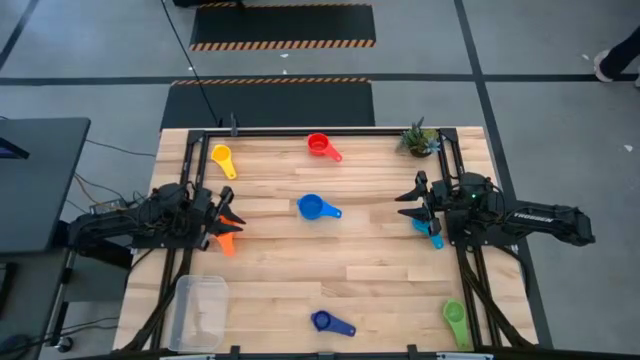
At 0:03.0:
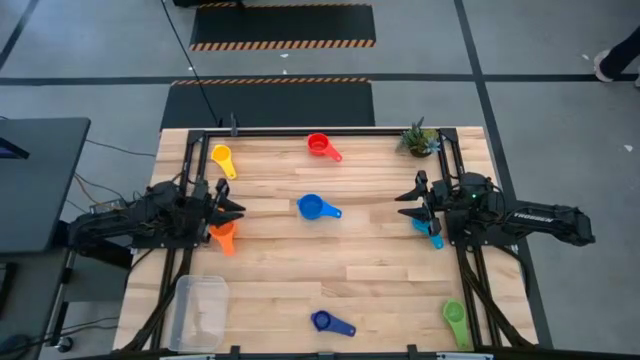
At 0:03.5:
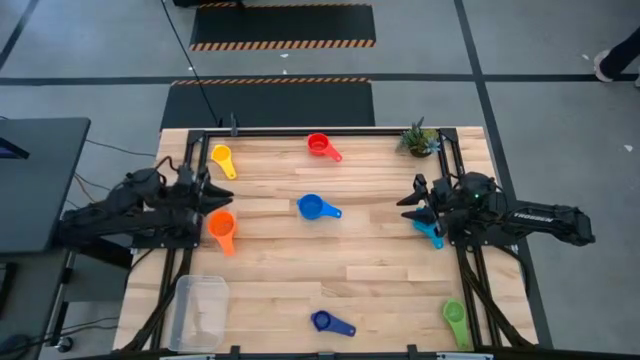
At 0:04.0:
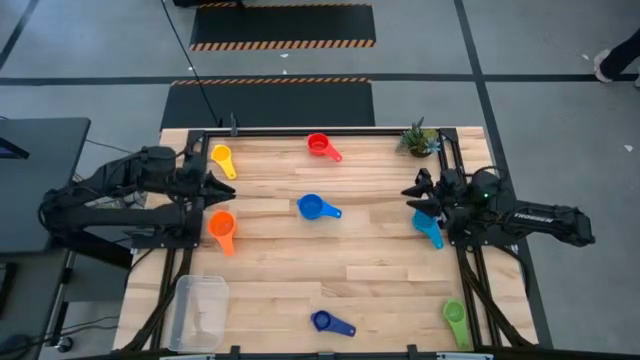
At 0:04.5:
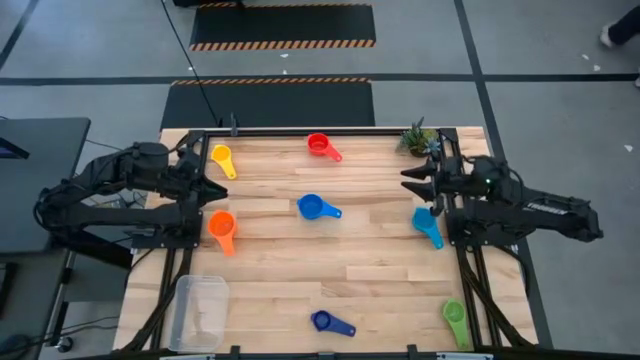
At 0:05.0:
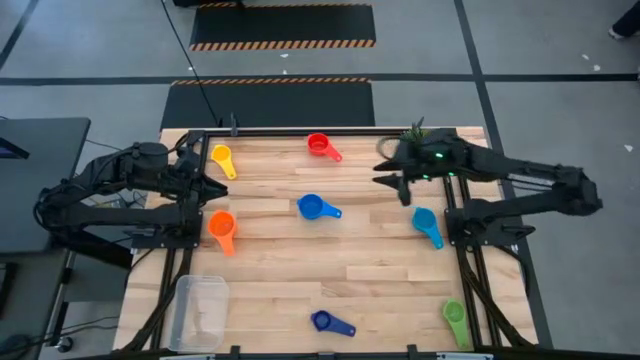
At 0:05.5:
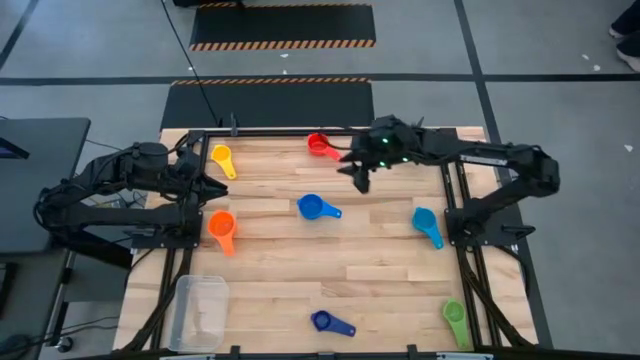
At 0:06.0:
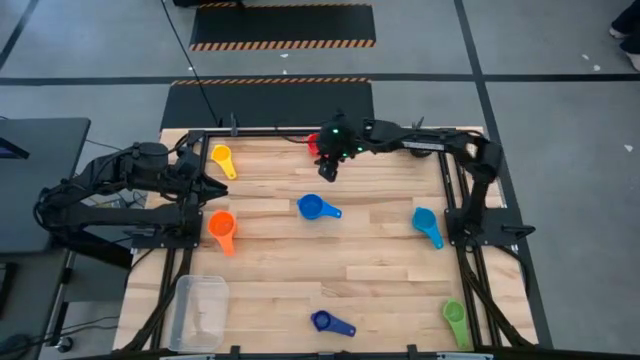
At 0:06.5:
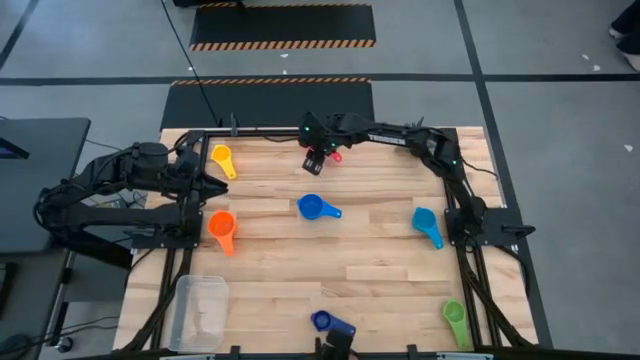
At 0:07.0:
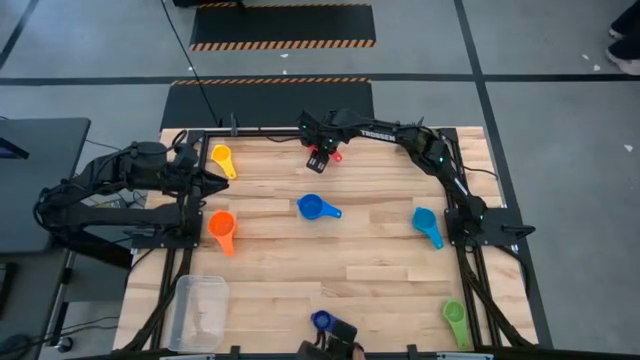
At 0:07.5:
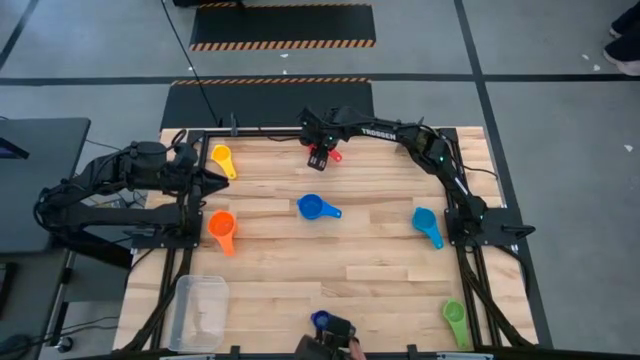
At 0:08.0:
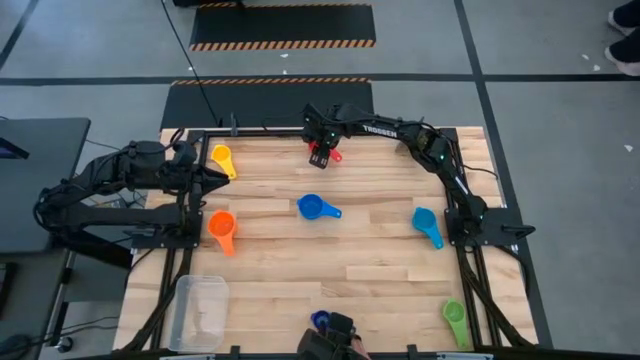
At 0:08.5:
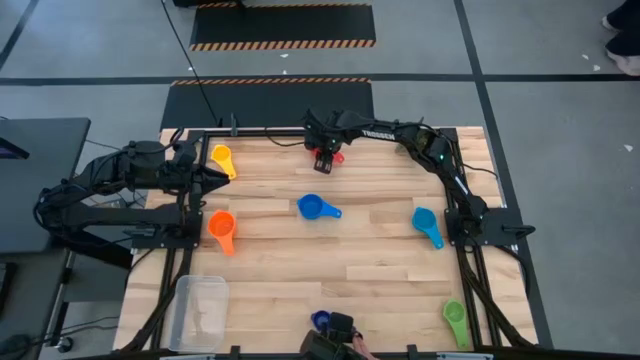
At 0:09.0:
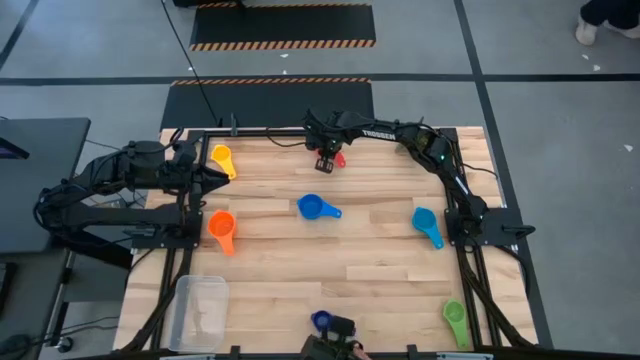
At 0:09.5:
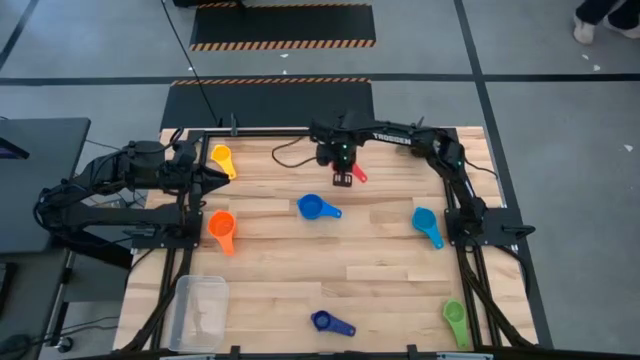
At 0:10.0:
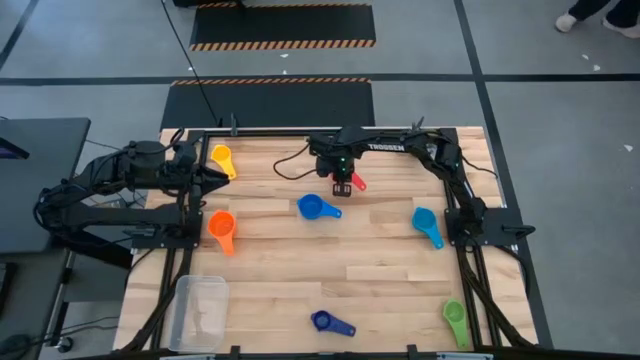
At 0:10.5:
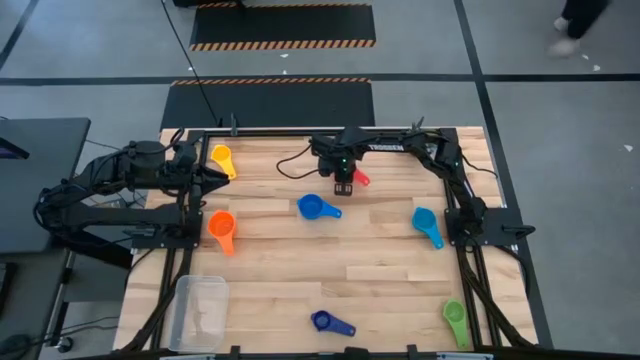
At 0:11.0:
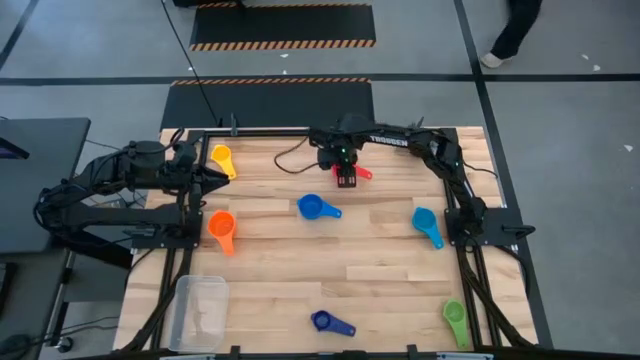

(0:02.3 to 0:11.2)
Task: Nest measuring cups in basket
Adjust the red measuring cup

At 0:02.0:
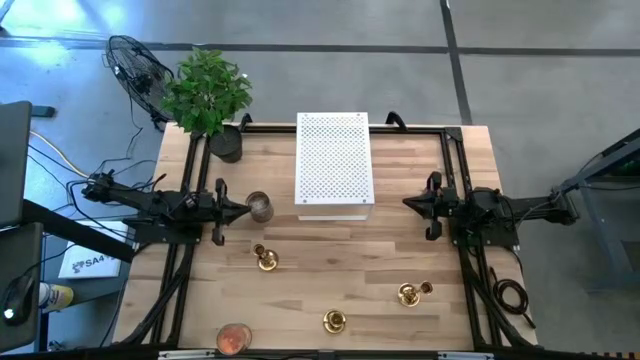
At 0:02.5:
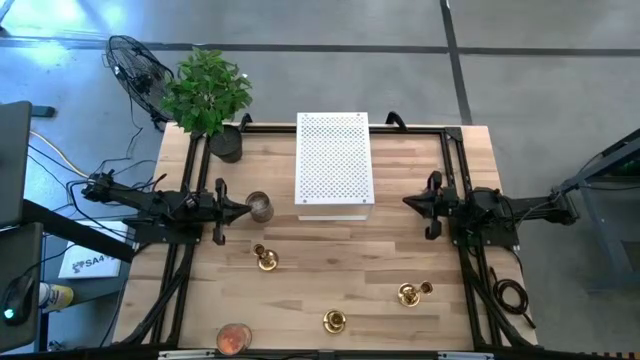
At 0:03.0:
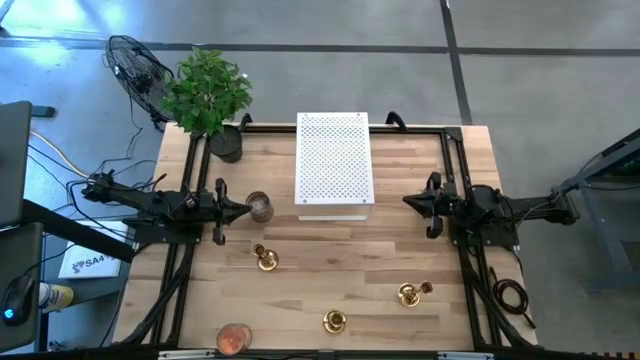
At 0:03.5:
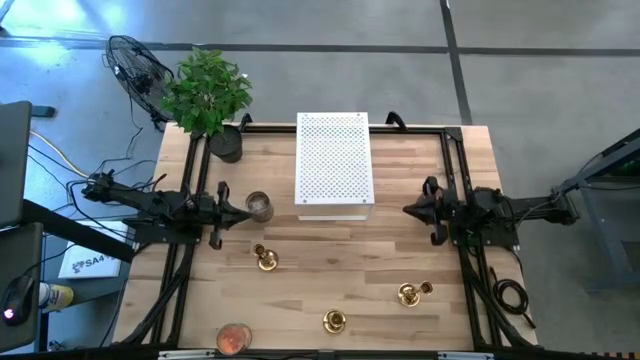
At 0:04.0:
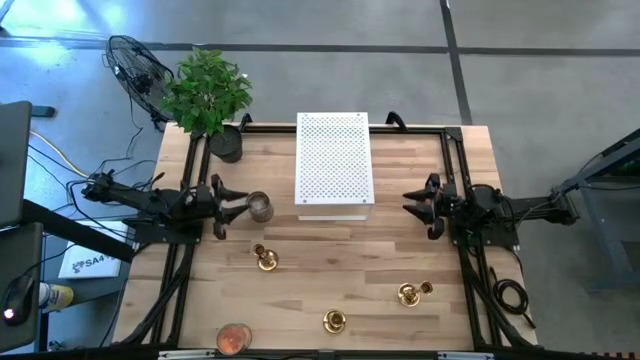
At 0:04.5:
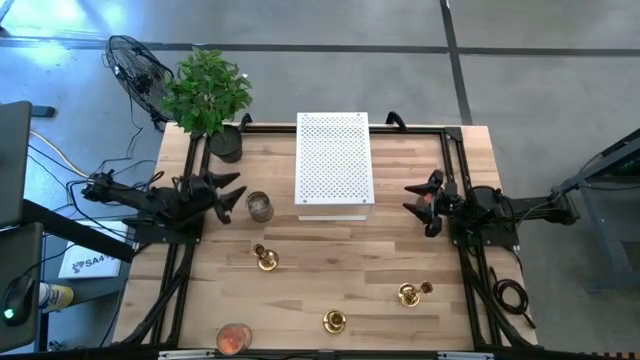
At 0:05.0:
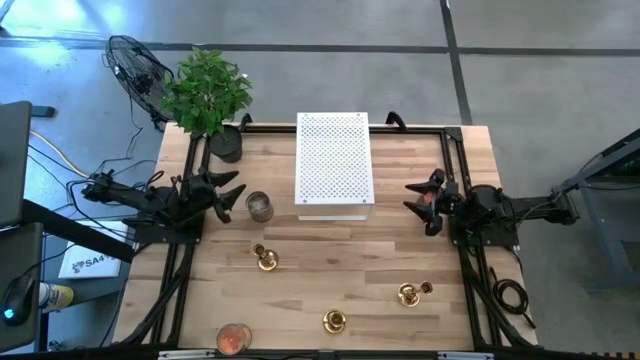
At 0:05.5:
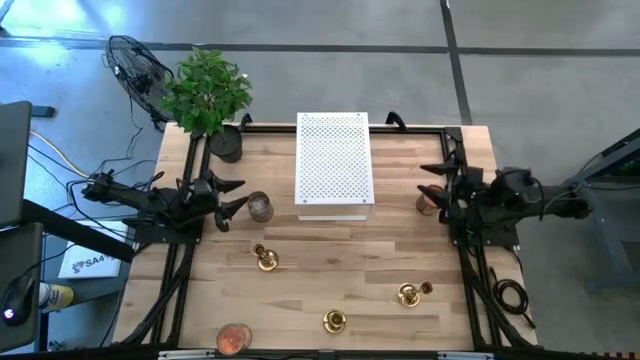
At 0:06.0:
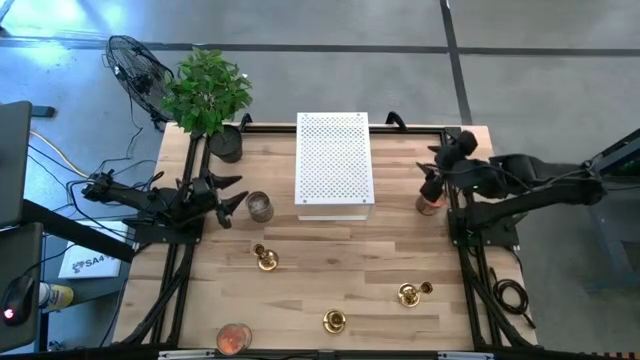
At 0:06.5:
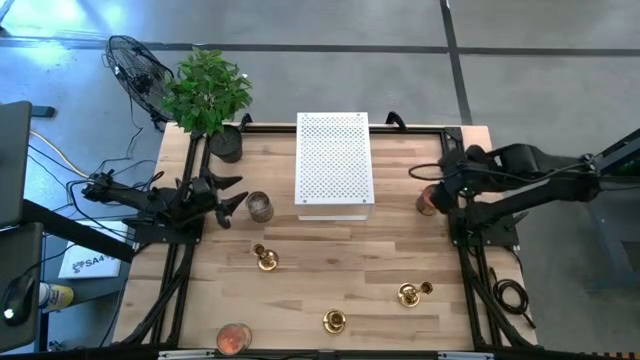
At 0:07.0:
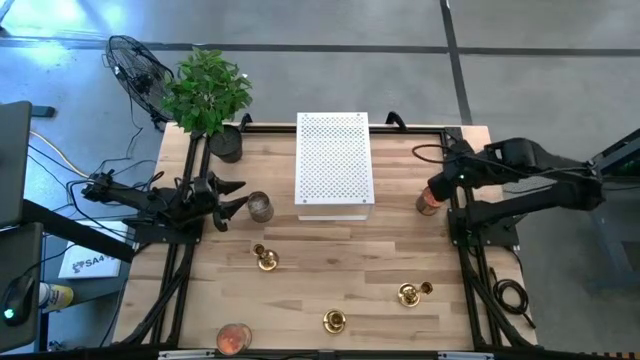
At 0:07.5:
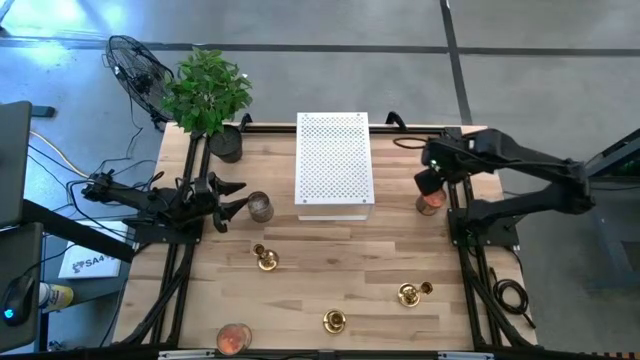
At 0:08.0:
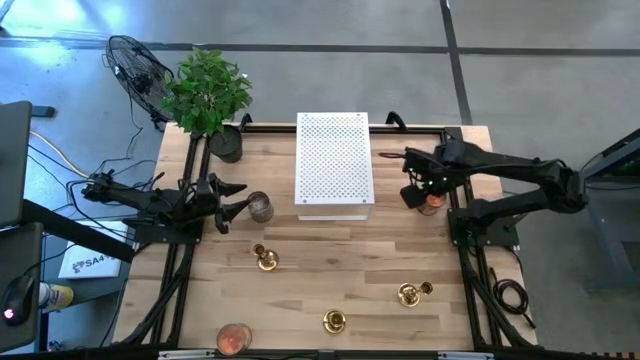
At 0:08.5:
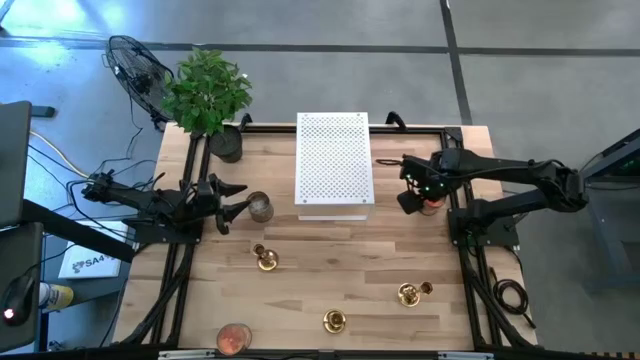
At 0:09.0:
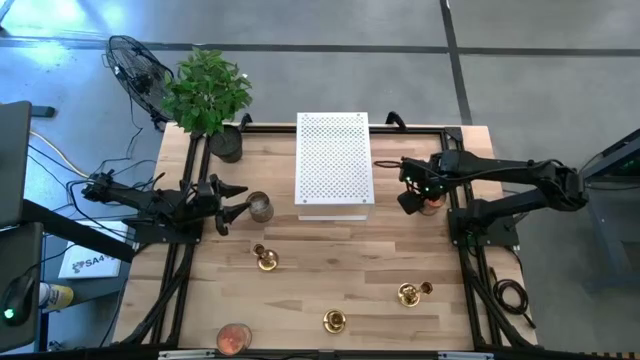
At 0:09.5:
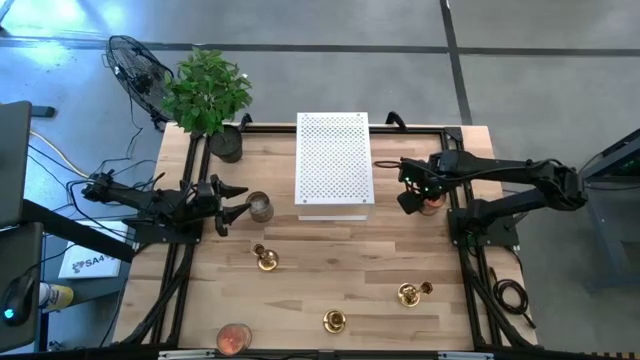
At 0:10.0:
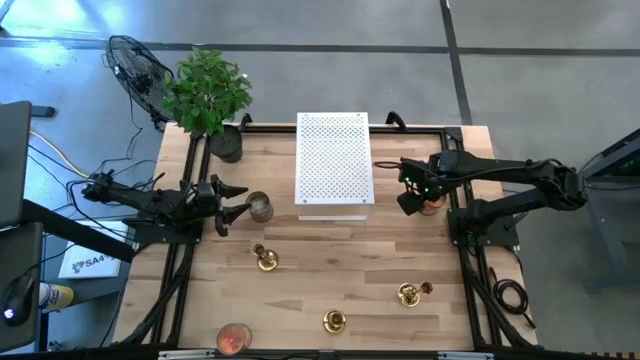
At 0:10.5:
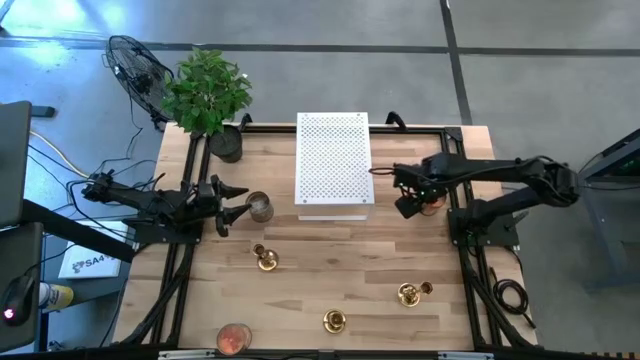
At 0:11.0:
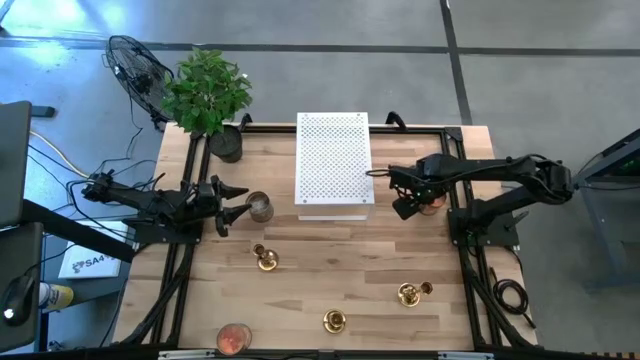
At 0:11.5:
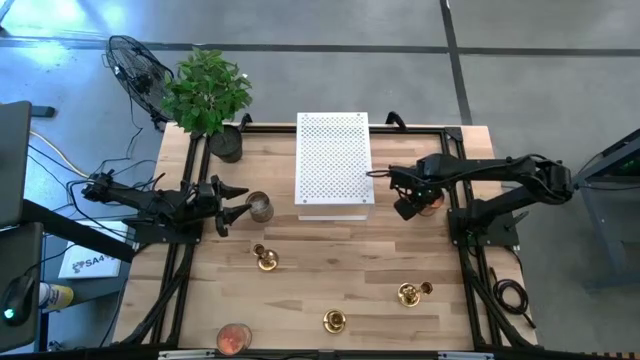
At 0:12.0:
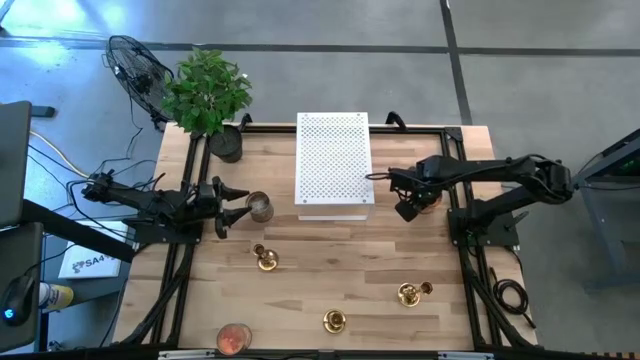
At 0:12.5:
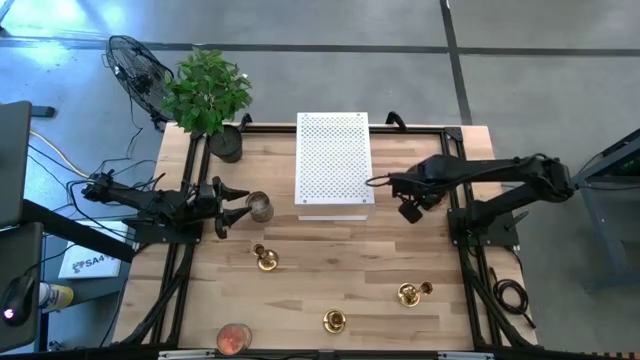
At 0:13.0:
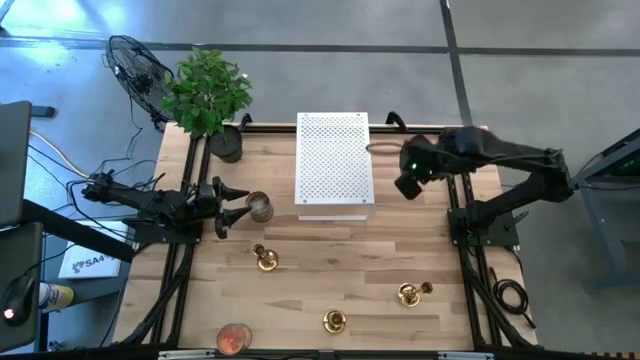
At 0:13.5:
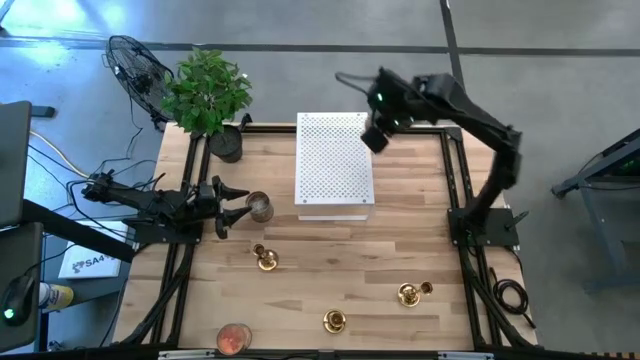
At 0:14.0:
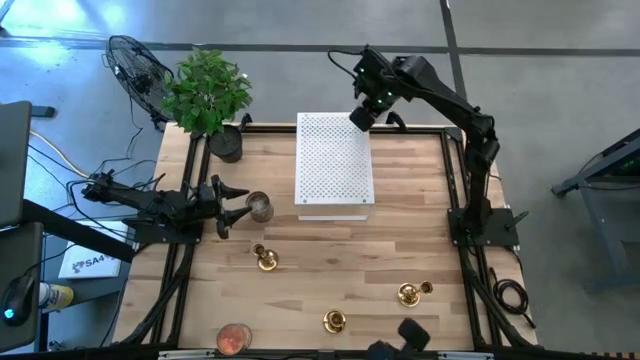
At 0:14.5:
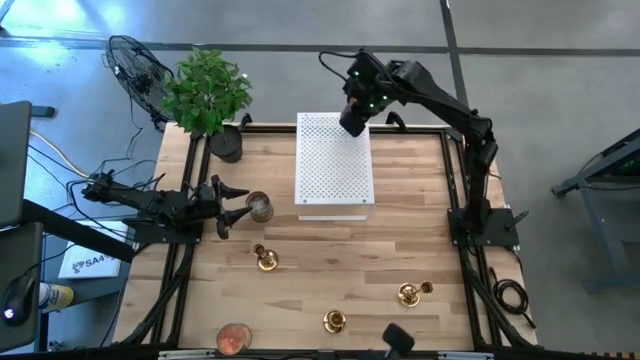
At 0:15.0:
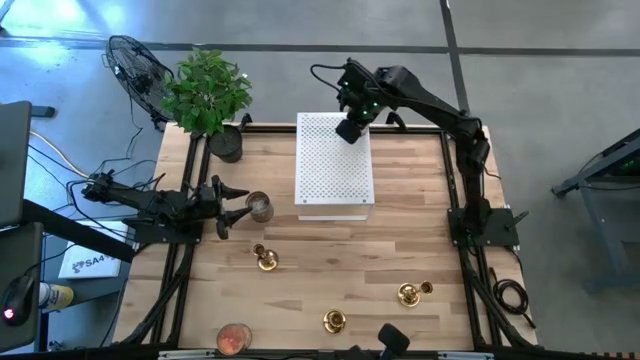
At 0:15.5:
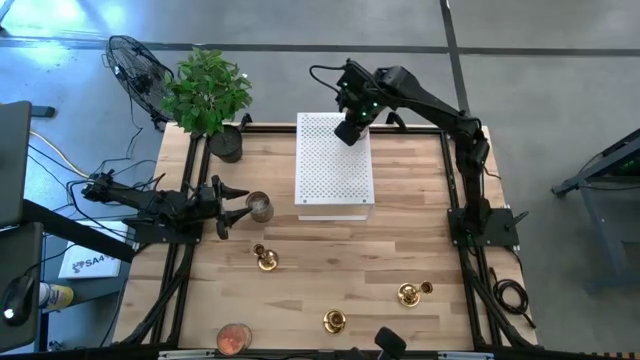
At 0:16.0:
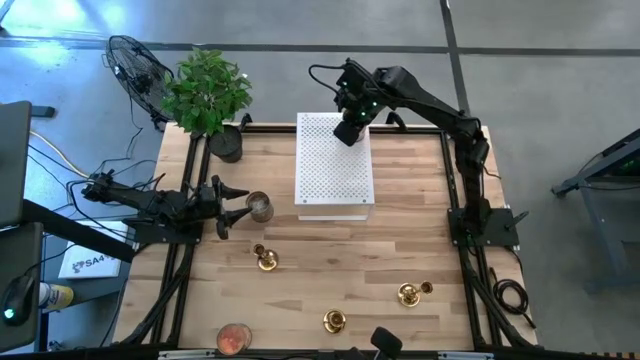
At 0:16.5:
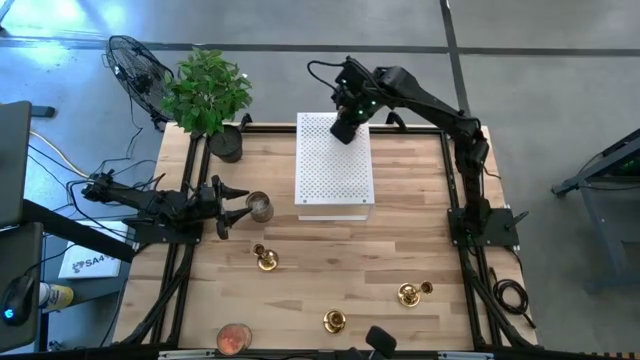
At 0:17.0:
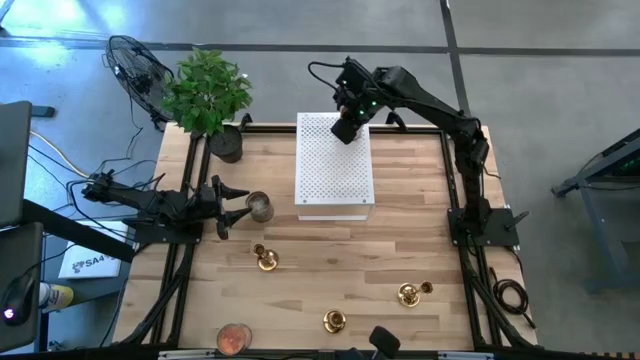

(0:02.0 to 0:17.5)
Task: Pick & Place candle stick holders
Put the top orange scented candle on the shelf
